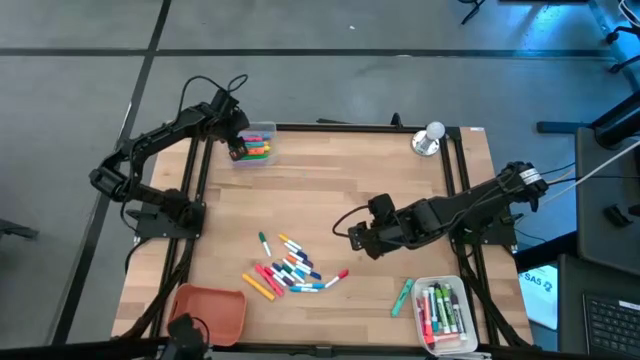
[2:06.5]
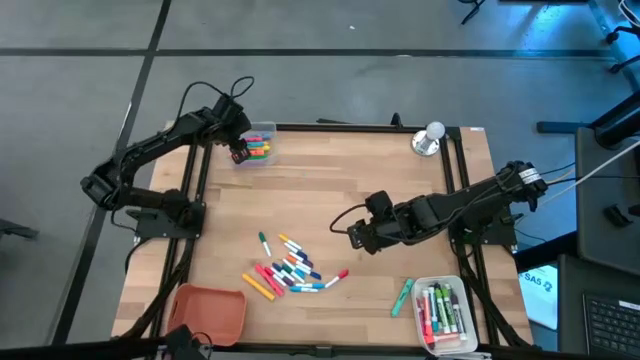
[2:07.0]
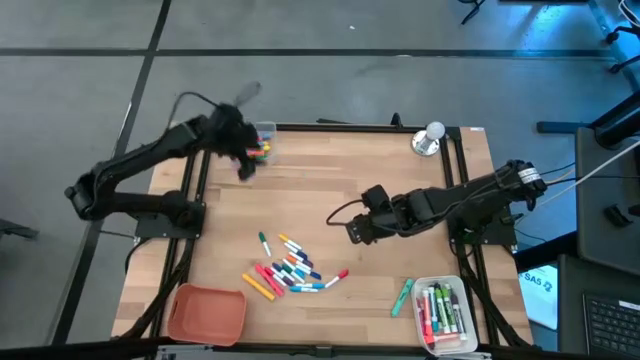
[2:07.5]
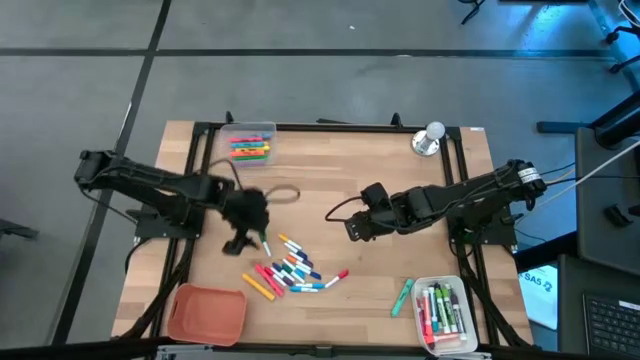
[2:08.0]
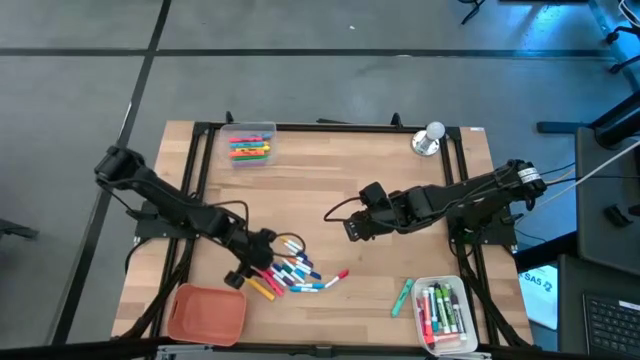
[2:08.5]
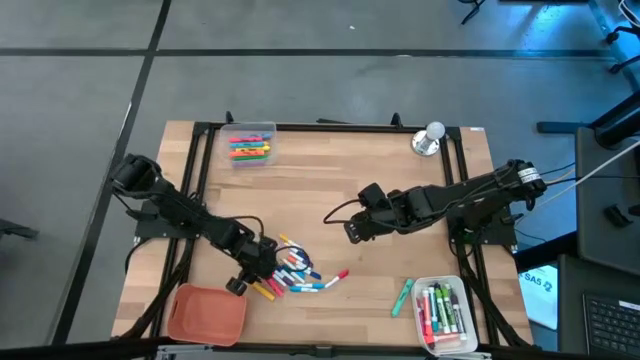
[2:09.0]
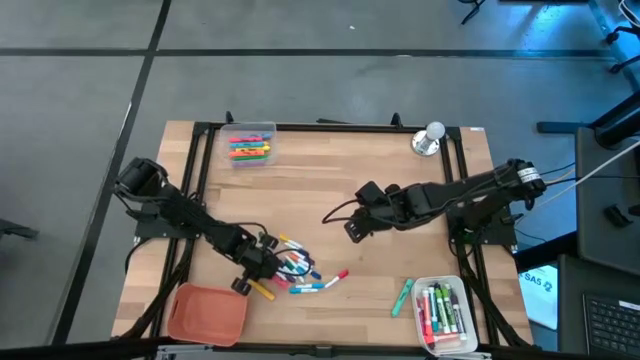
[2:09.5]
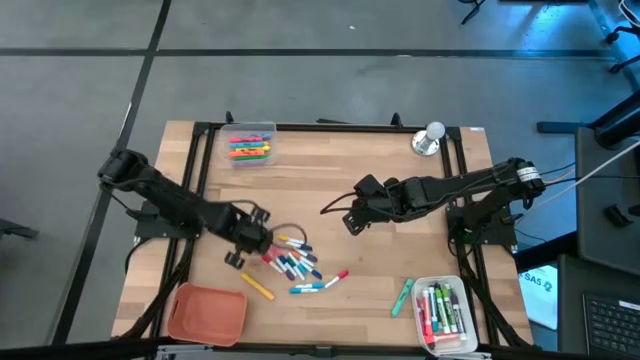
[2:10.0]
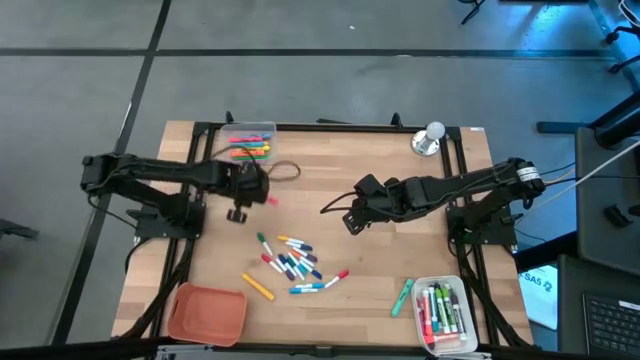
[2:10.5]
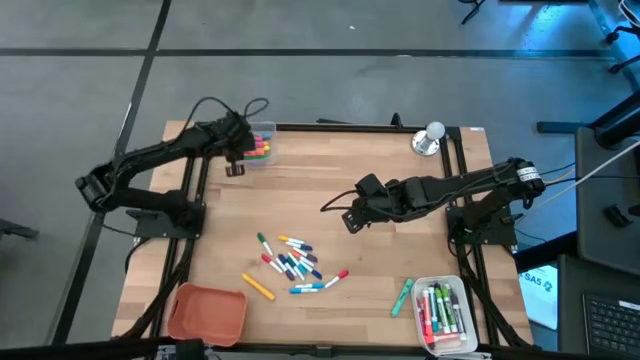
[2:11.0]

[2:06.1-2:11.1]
Task: Pick & Place Markers
Put the middle center red pen into the transparent bin

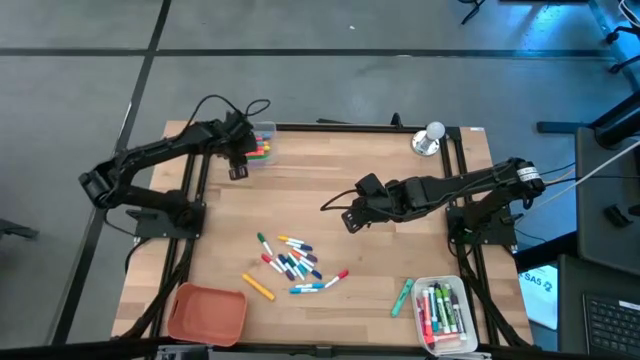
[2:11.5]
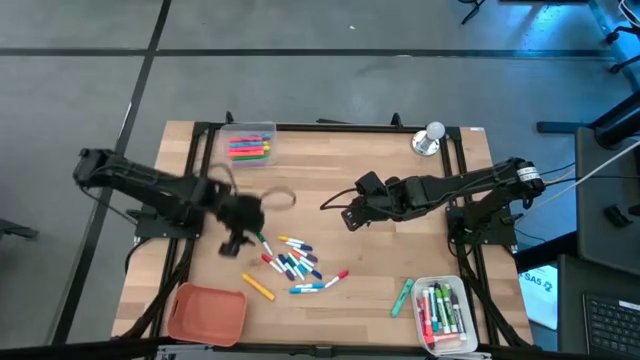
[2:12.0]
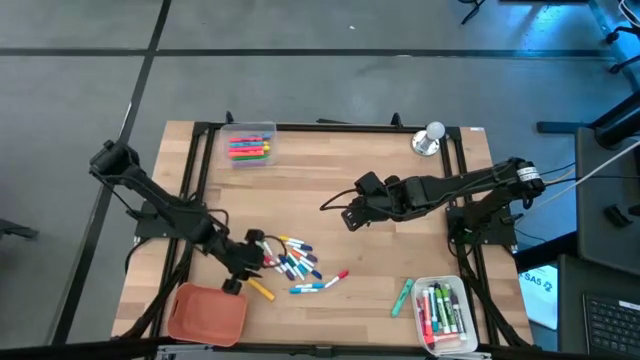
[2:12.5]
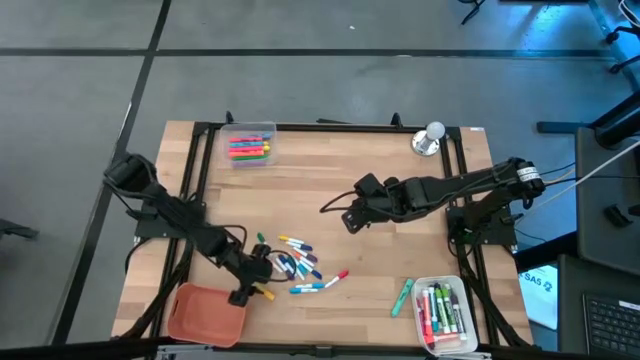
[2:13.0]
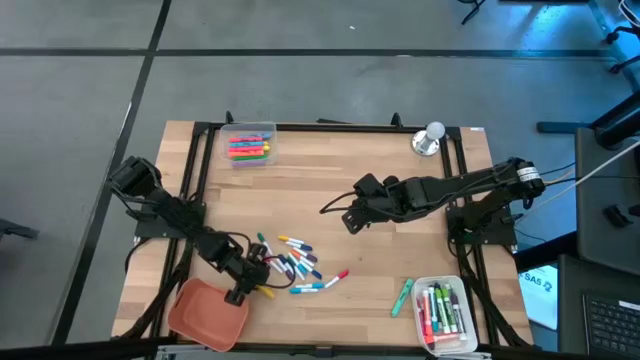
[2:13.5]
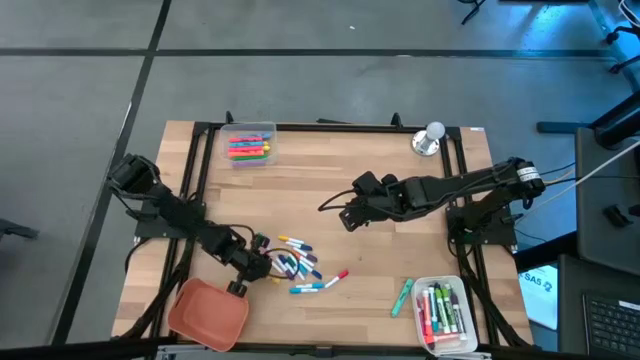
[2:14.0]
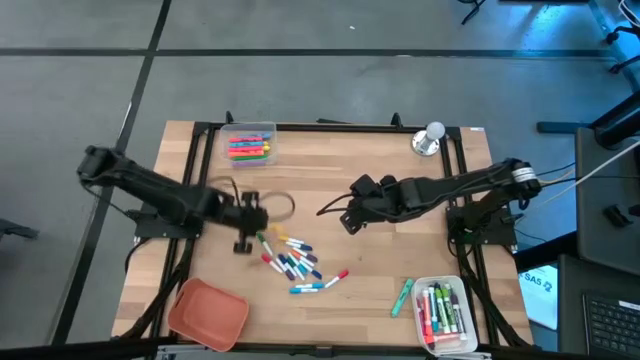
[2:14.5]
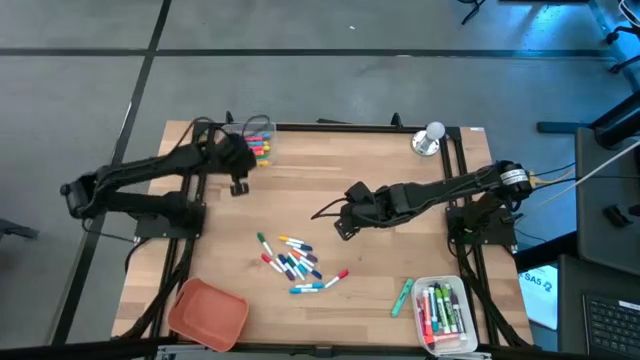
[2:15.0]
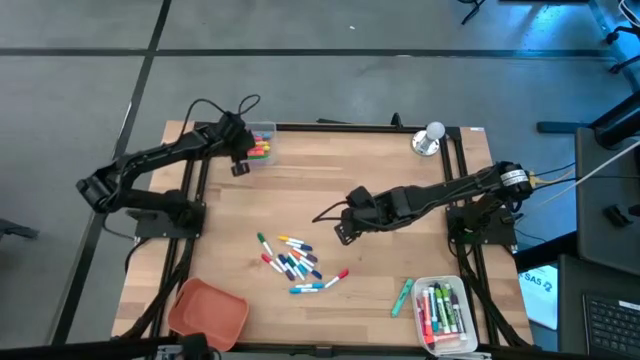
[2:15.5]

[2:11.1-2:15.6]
Put the bottom left yellow pen into the transparent bin

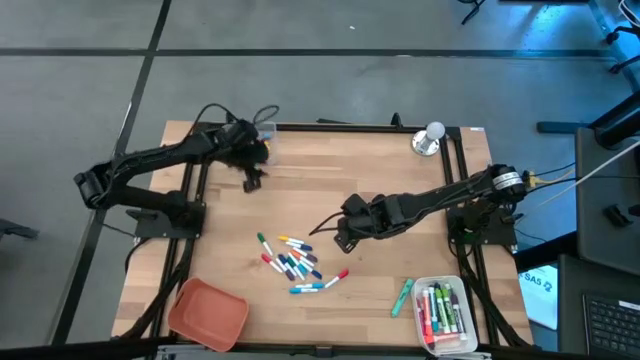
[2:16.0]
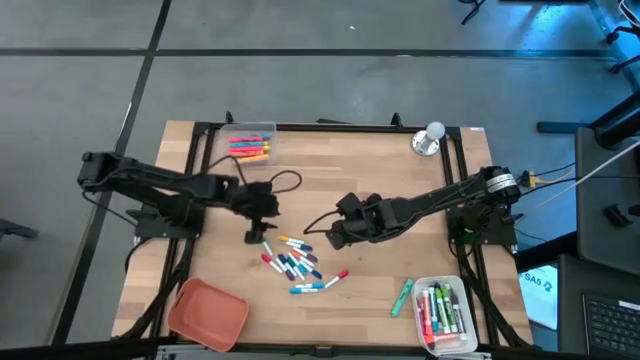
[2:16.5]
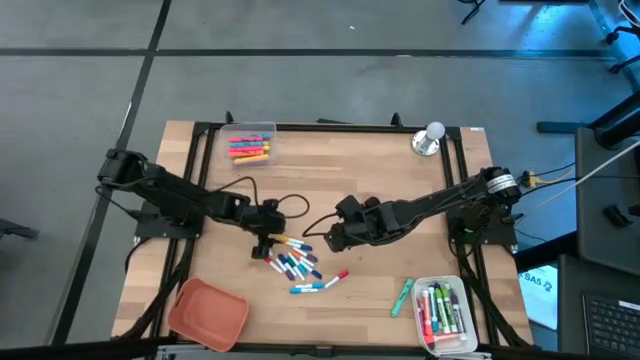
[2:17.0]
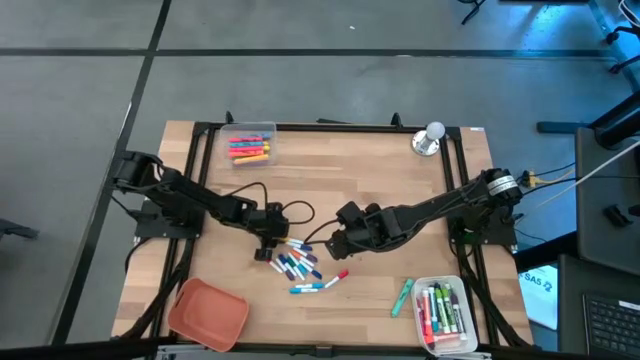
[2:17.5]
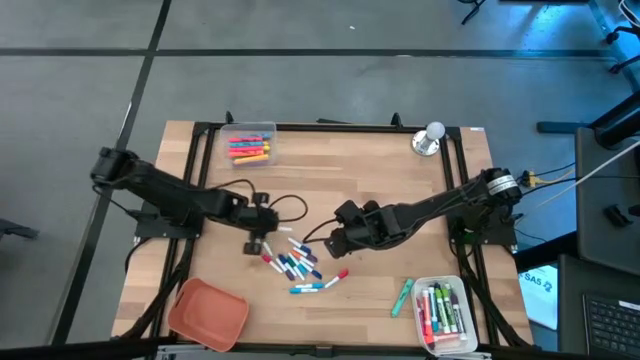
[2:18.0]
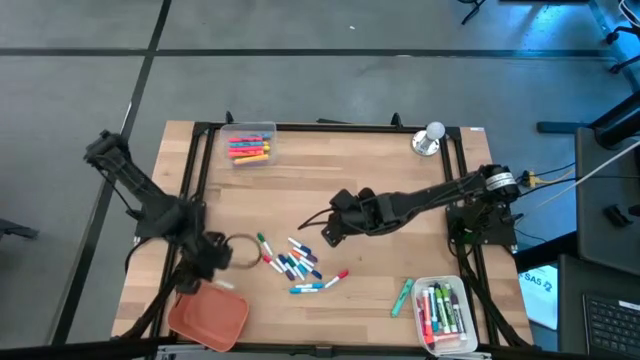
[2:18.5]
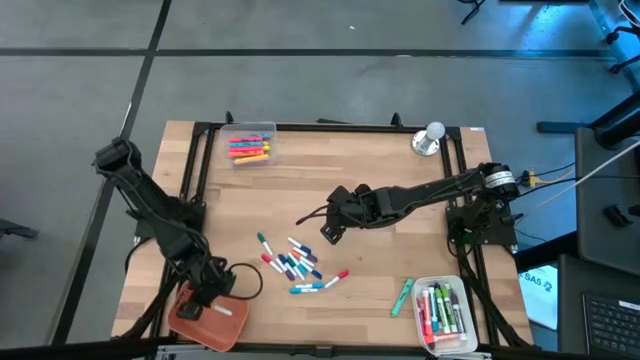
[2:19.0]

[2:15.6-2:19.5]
Put the yellow pen into the orange bin

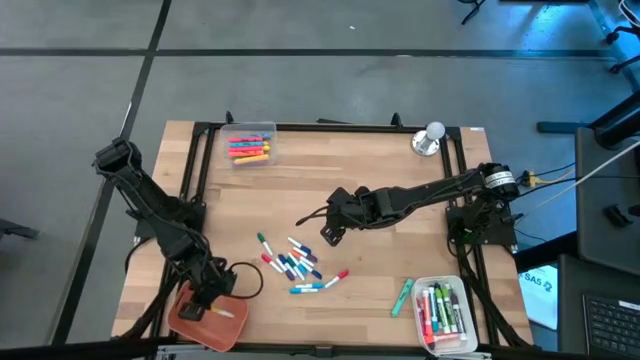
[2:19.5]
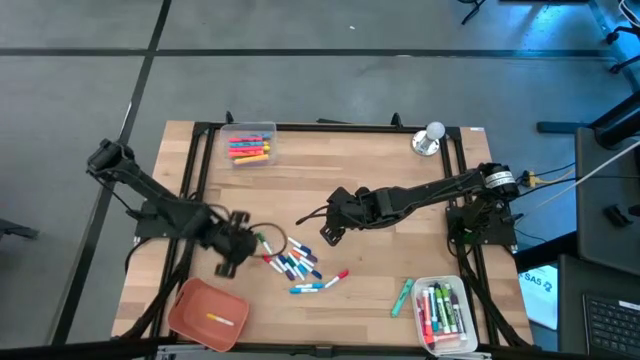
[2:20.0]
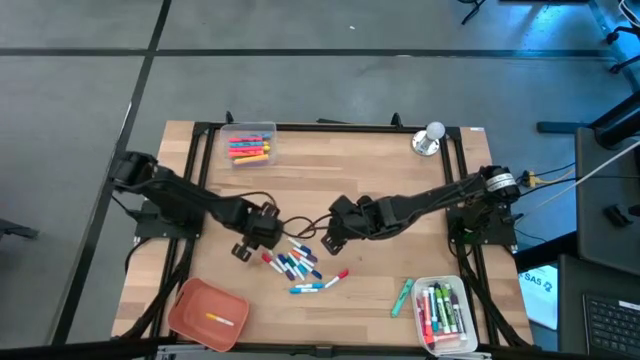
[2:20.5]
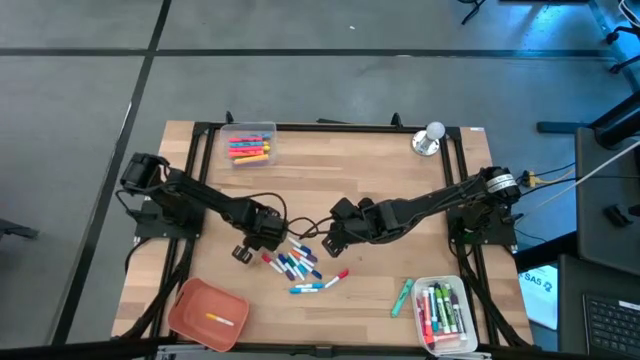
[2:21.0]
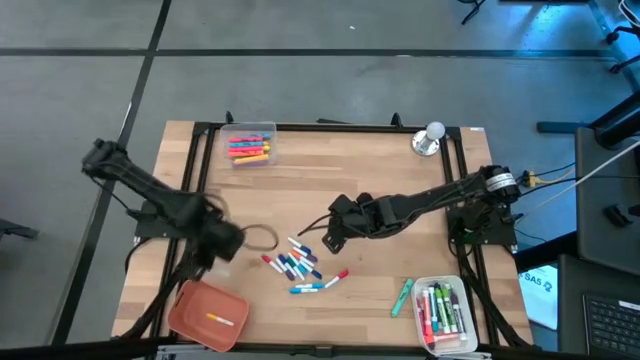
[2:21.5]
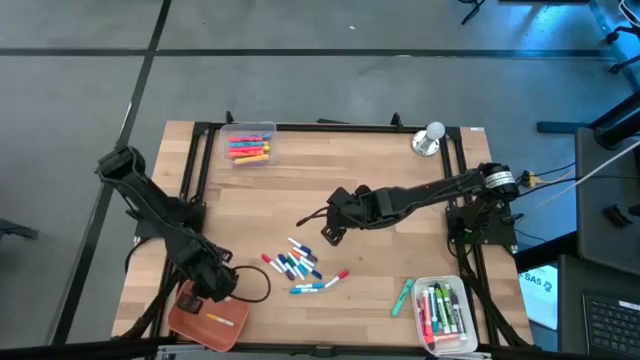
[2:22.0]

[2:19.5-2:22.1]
Put the pitch green pen into the orange bin

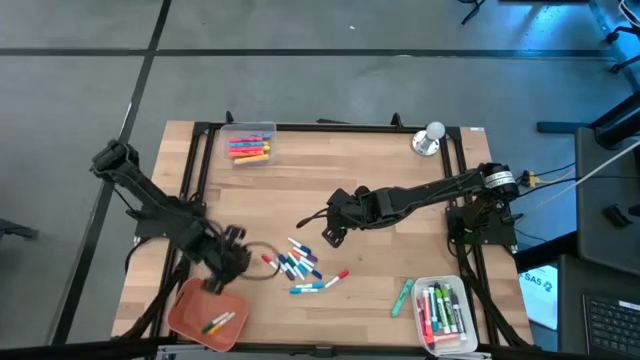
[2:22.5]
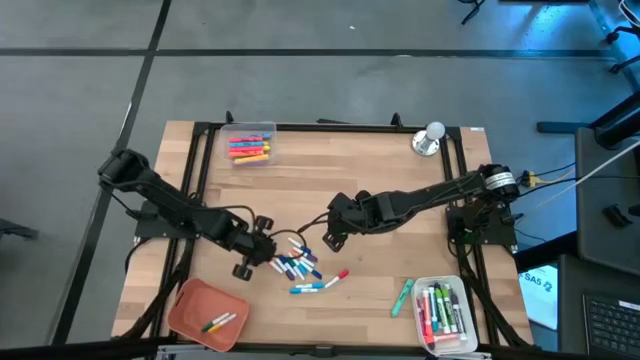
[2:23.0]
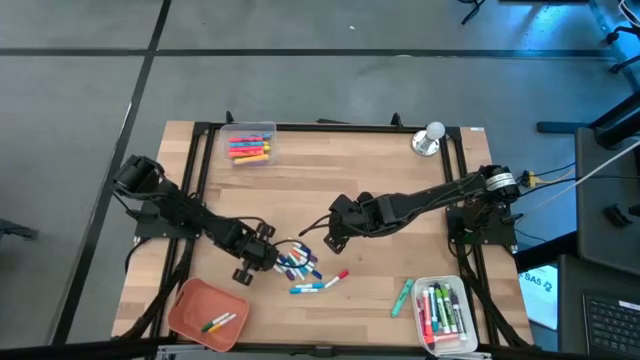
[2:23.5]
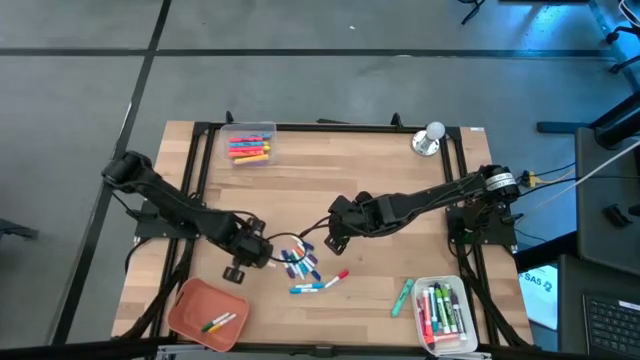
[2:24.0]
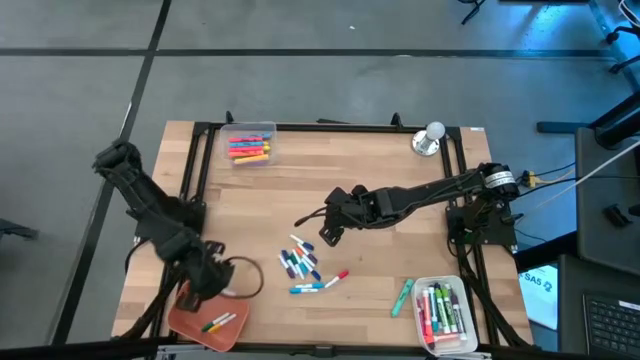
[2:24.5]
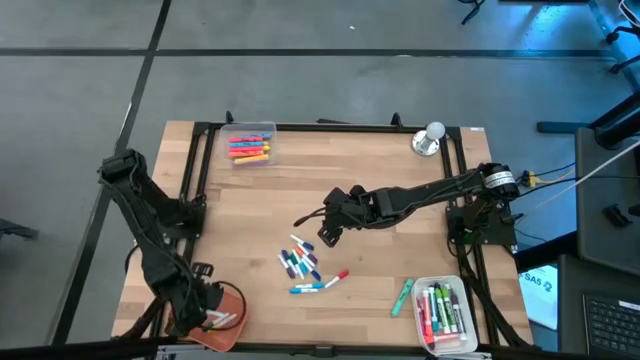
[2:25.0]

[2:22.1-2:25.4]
Put the bottom center red pen into the orange bin

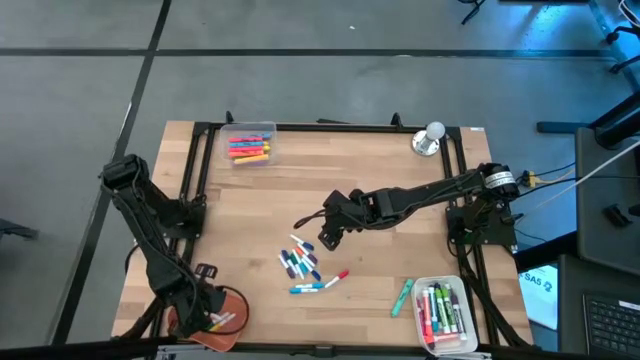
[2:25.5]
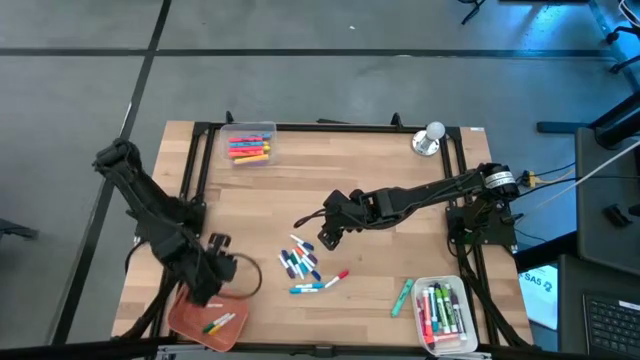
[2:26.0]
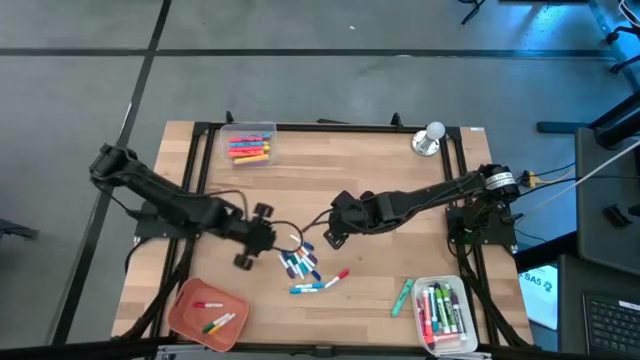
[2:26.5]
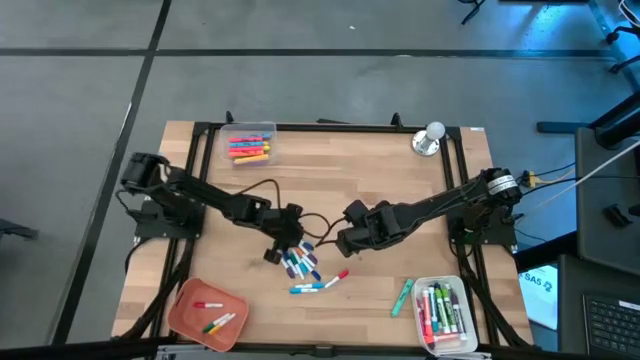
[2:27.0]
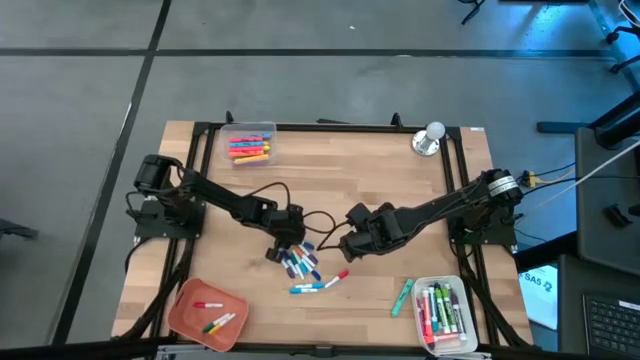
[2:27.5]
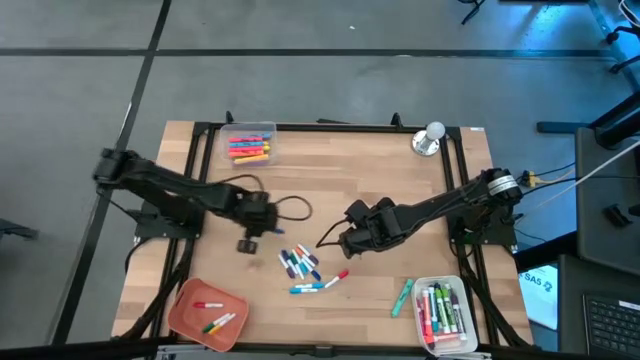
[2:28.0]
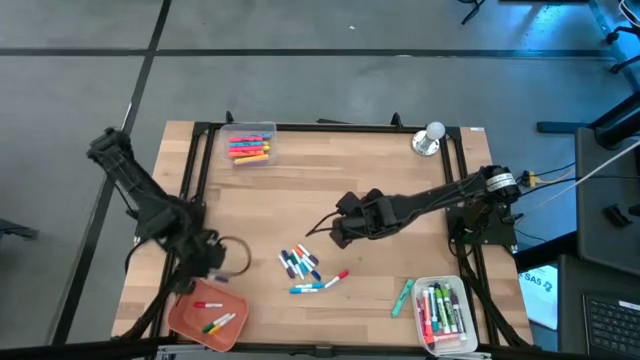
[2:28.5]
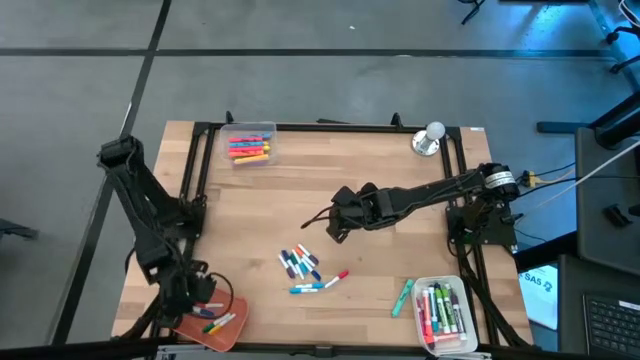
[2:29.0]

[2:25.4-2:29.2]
Put the blue pen into the orange bin
